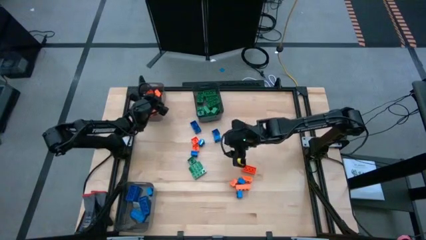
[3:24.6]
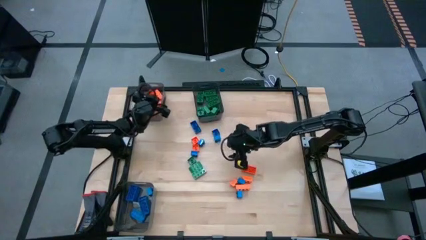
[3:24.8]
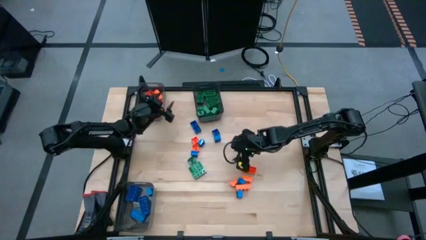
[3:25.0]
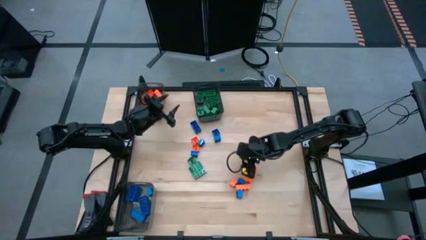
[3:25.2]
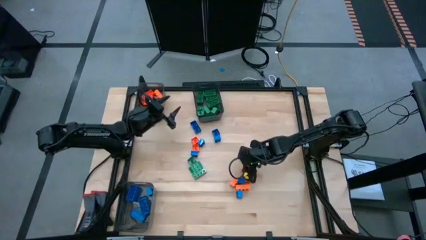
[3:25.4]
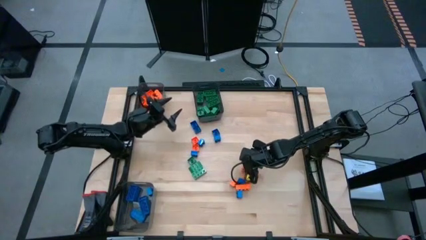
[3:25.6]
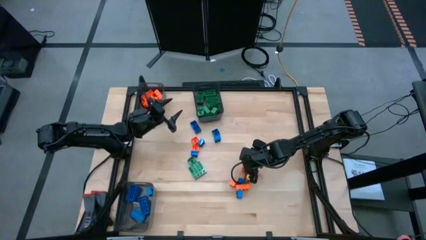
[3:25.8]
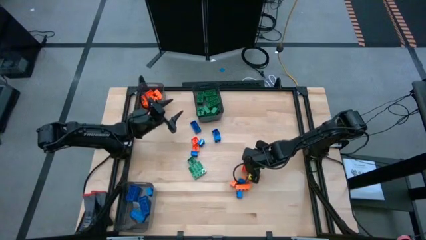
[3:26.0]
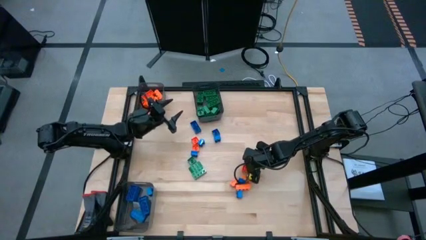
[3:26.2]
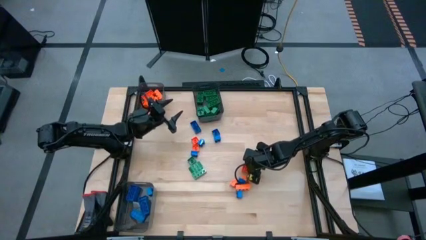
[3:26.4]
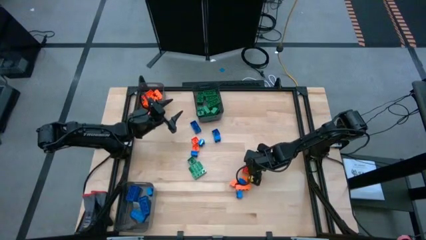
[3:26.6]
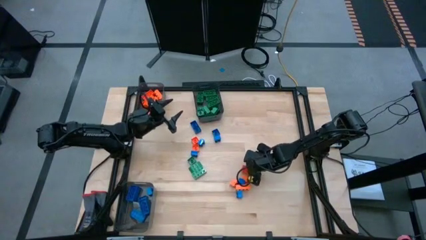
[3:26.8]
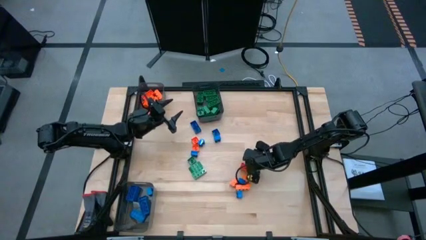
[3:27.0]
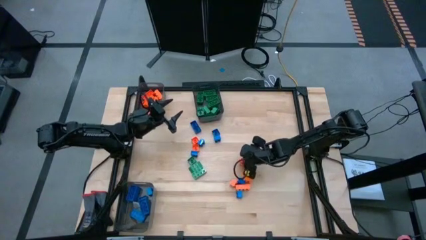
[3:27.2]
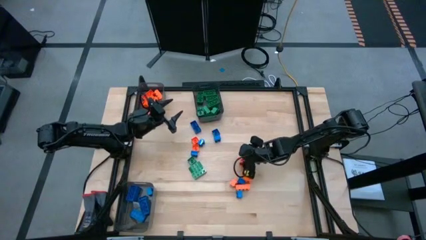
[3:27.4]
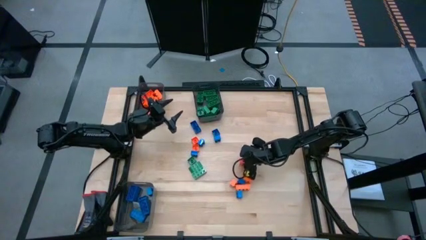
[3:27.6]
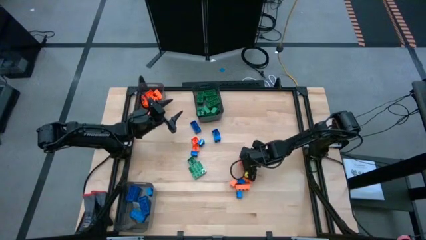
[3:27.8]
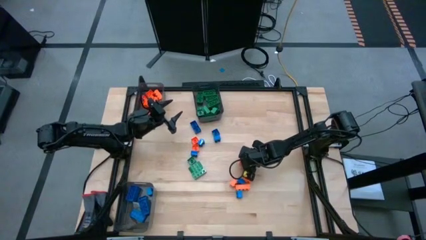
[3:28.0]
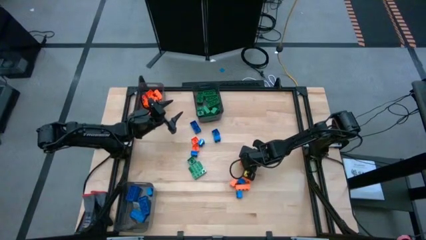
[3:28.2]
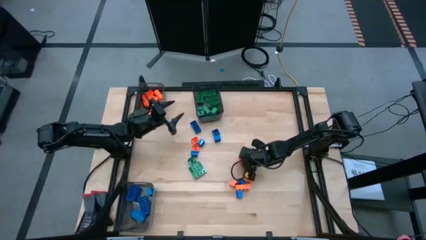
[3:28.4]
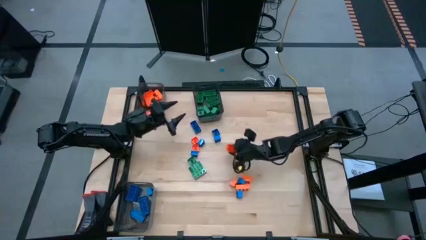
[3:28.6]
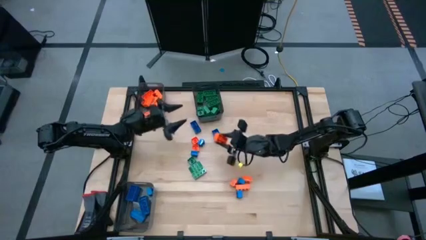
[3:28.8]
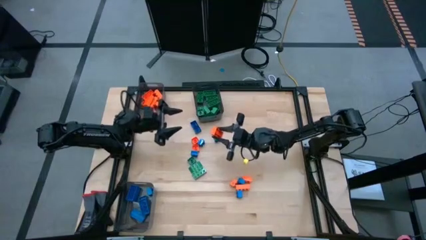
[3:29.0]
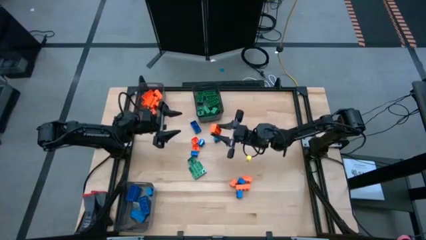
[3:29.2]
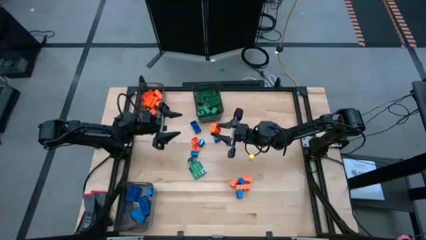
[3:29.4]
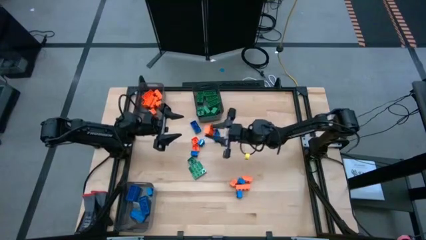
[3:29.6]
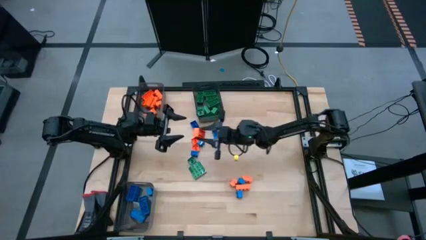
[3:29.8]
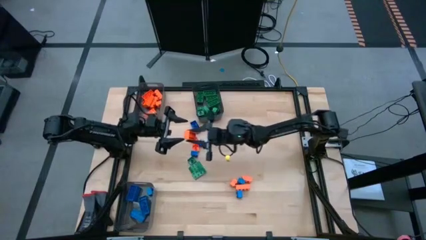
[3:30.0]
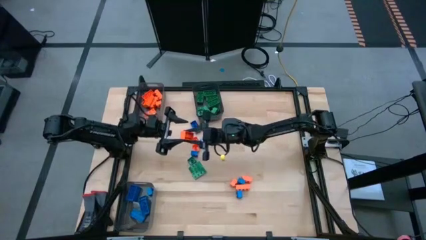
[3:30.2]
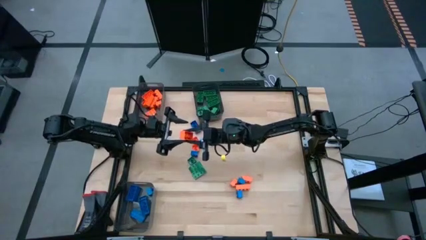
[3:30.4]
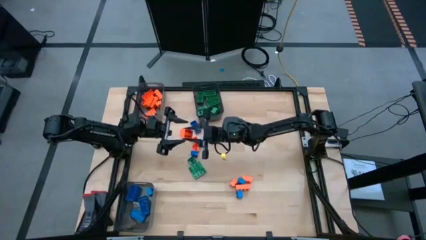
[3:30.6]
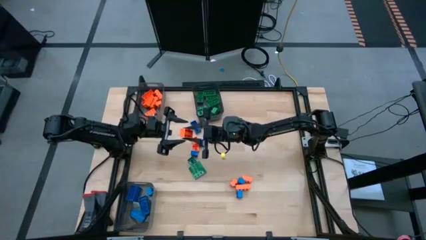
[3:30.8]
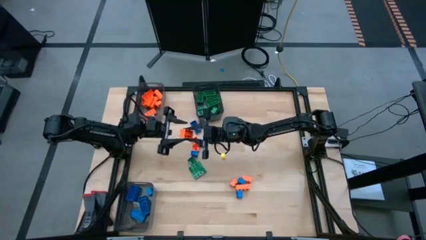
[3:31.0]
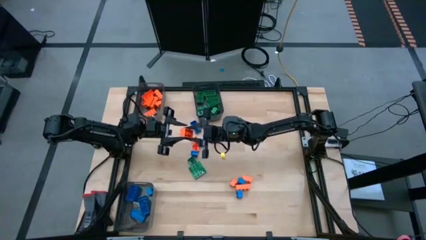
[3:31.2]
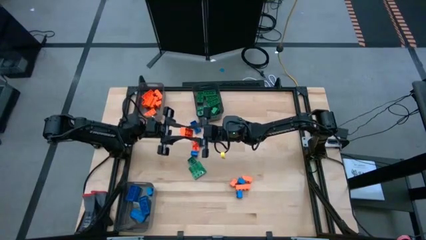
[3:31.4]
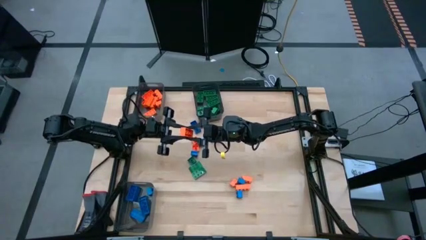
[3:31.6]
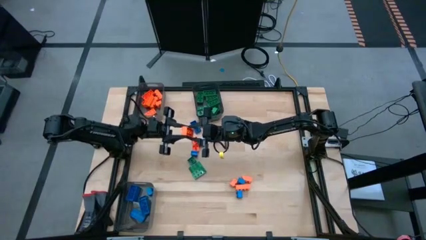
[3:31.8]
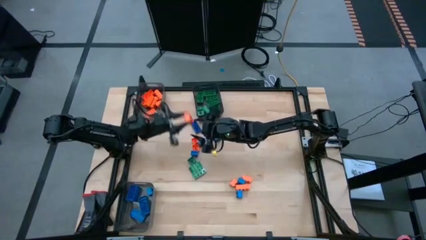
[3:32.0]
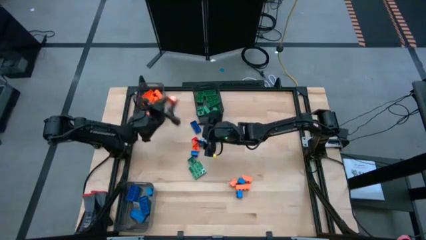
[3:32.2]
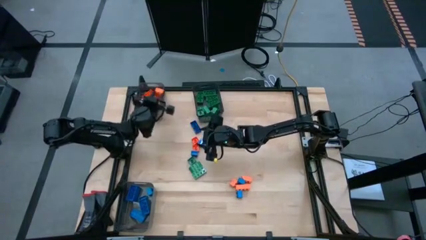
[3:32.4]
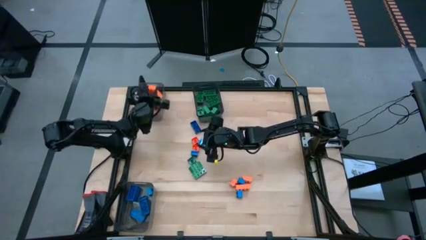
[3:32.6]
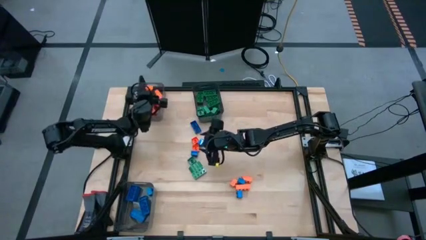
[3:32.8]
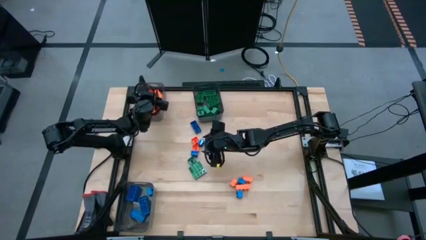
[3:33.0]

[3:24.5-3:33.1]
Task: Sort blocks
Put the orange game piece into the top left black transparent bin

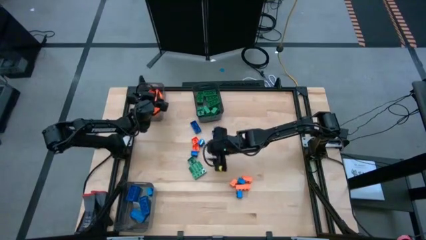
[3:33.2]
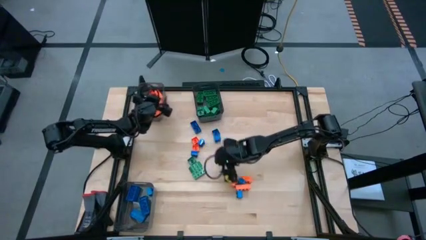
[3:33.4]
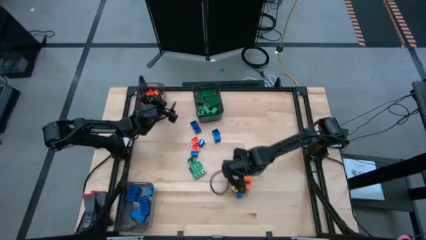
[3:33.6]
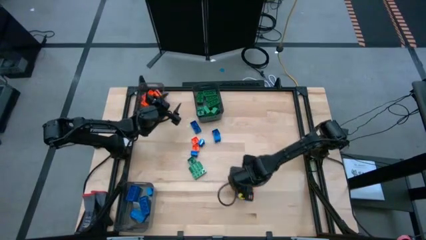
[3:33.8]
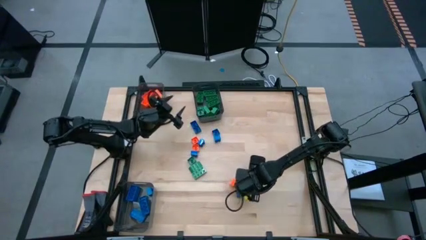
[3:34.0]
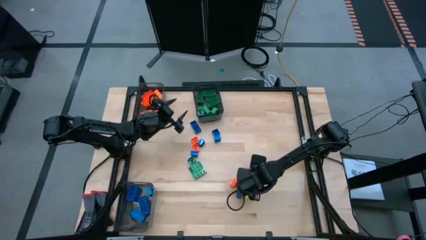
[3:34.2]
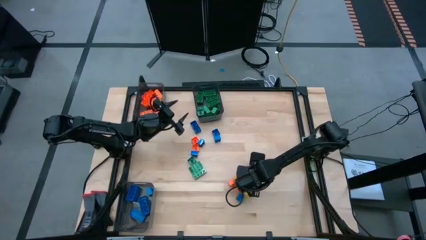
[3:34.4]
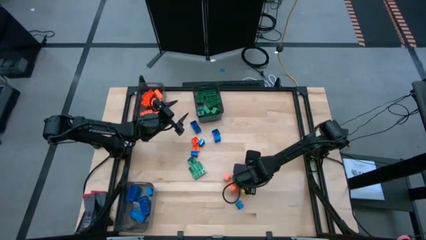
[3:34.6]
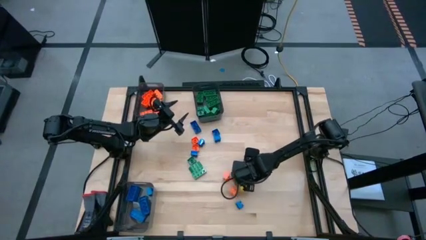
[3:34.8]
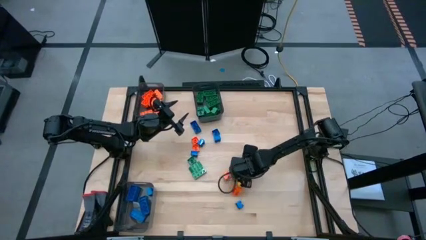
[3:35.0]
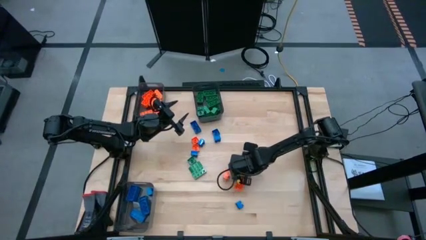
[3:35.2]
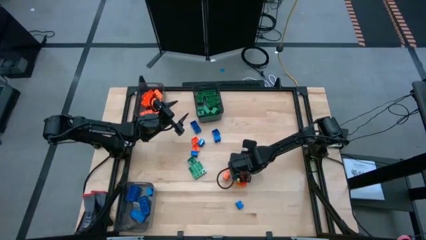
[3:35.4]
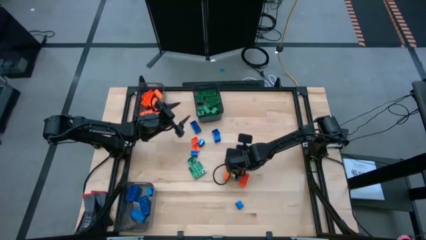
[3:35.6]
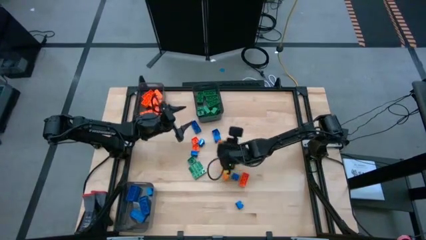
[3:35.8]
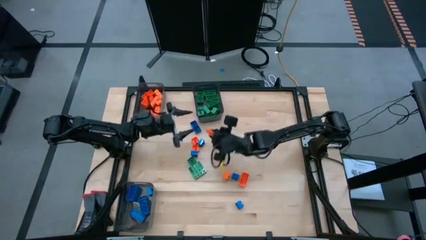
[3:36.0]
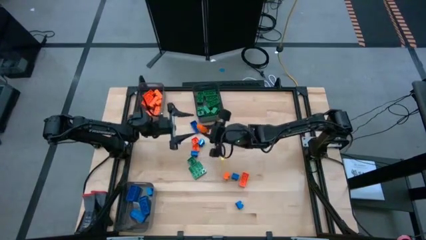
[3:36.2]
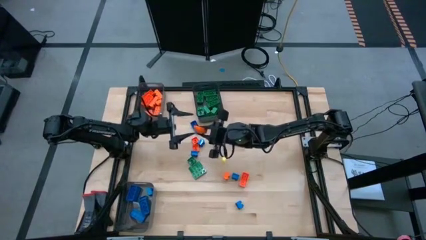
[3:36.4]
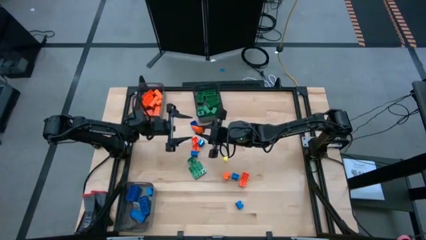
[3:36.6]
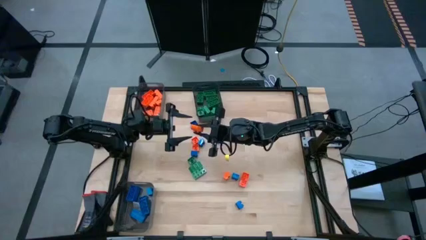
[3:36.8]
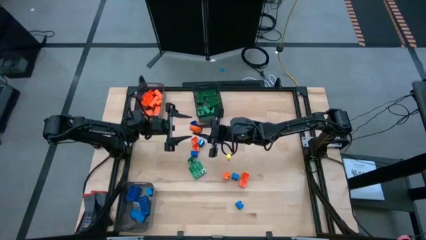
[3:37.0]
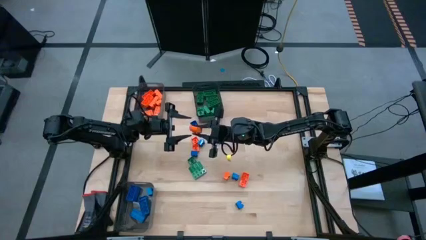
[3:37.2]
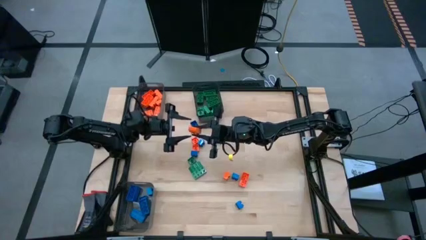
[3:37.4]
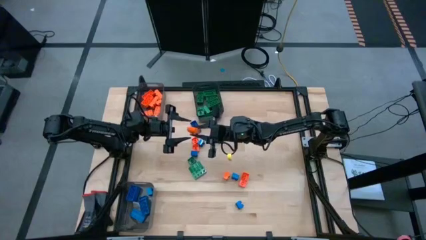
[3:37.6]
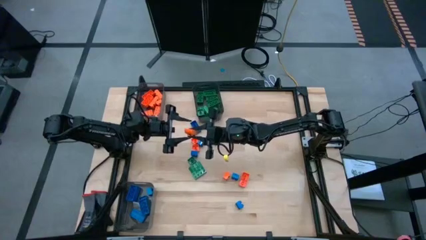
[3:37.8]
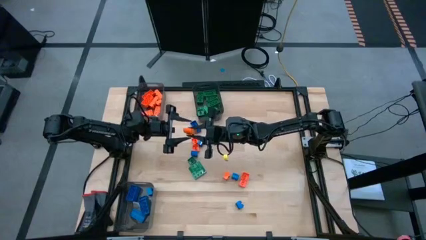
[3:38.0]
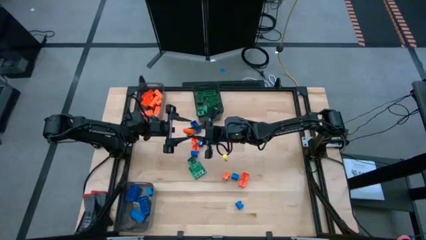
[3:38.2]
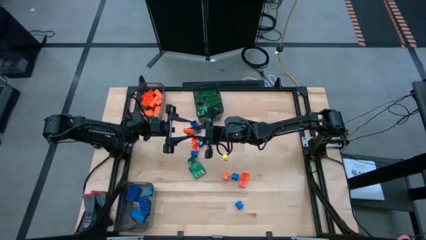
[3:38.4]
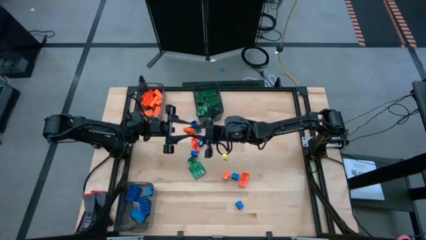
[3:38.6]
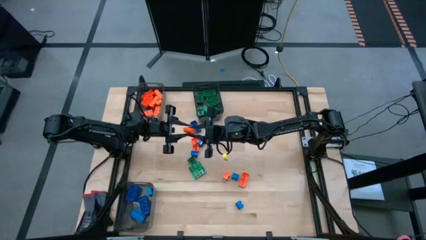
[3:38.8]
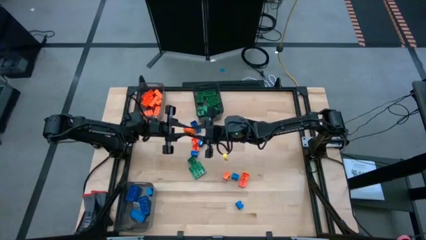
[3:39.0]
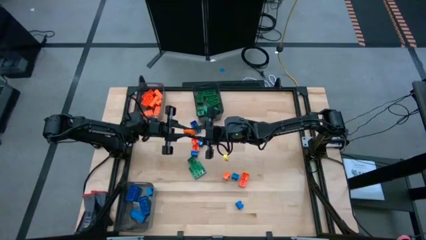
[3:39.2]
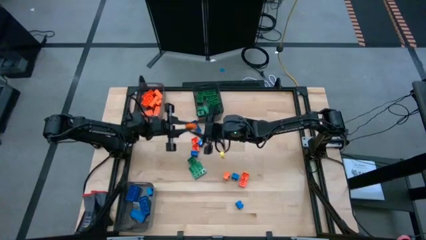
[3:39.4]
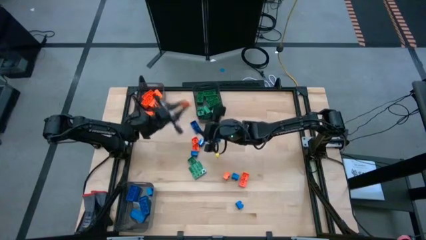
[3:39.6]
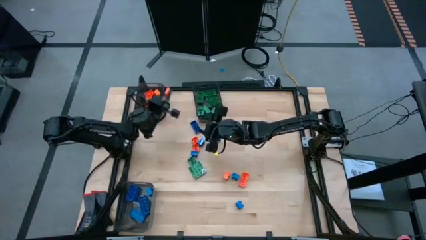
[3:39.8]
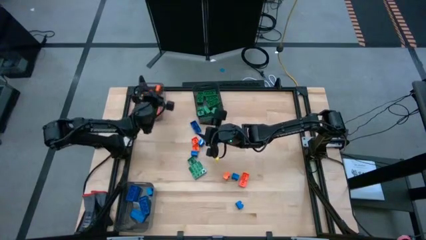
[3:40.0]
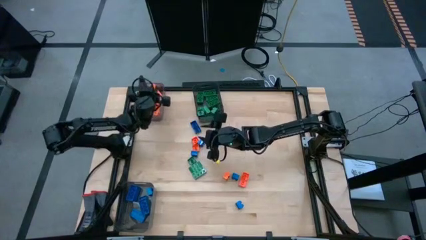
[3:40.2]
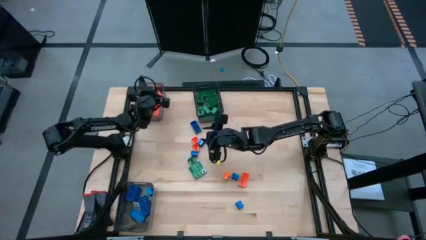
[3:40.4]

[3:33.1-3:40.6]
Put the orange game piece into the top left black transparent bin

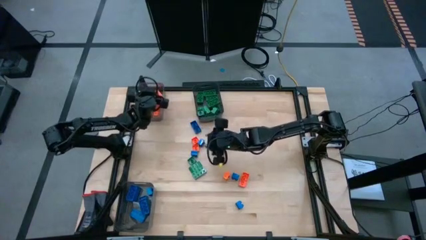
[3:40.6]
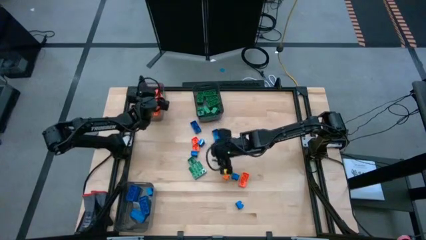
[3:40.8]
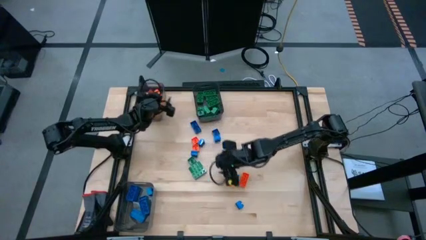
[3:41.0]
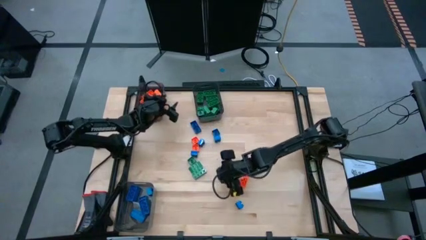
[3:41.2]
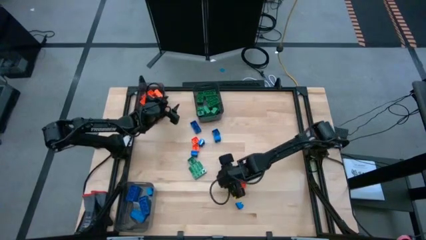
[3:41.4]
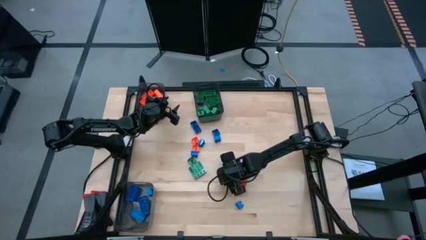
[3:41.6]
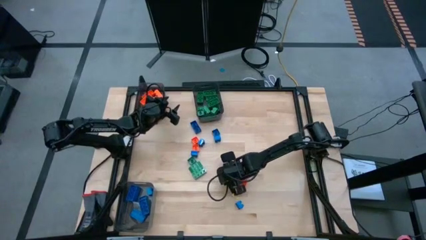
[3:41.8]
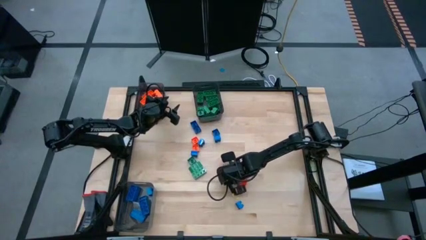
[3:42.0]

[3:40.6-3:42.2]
Put the orange game piece into the top left black transparent bin
